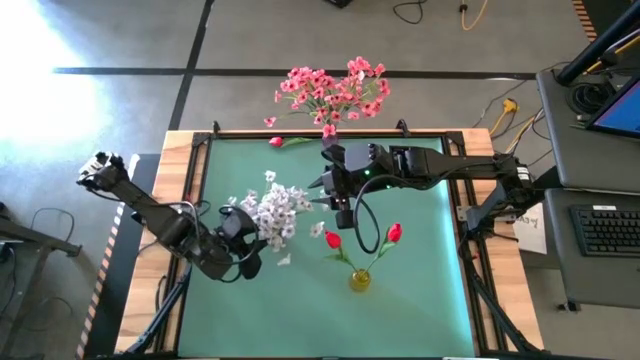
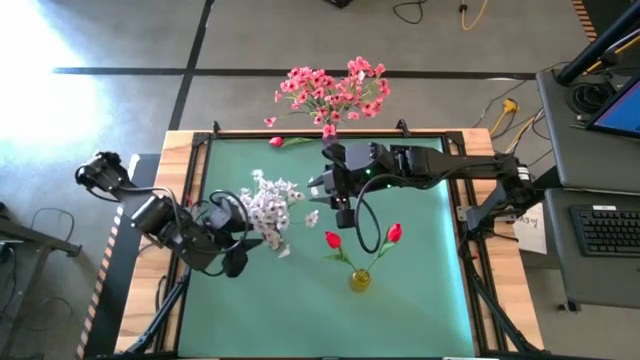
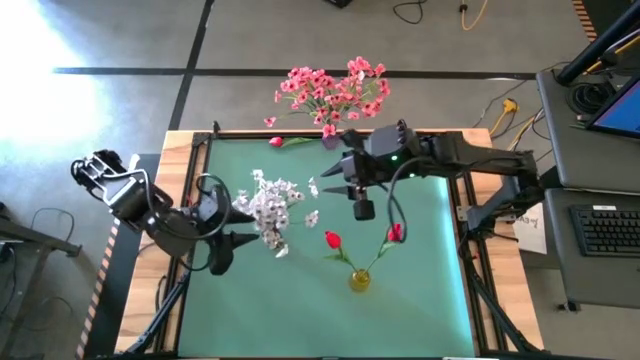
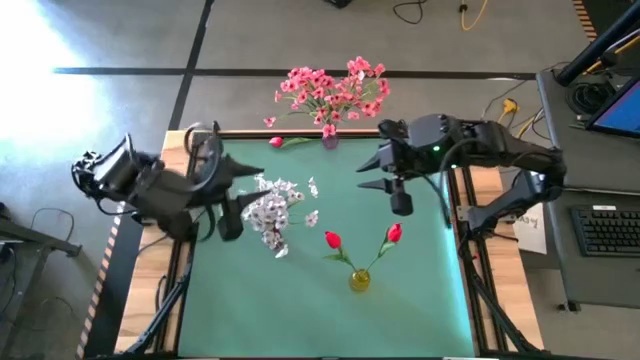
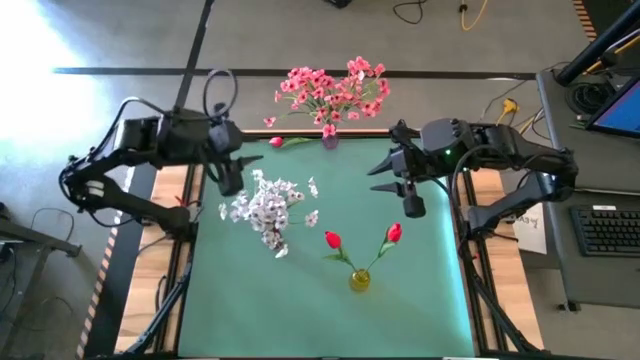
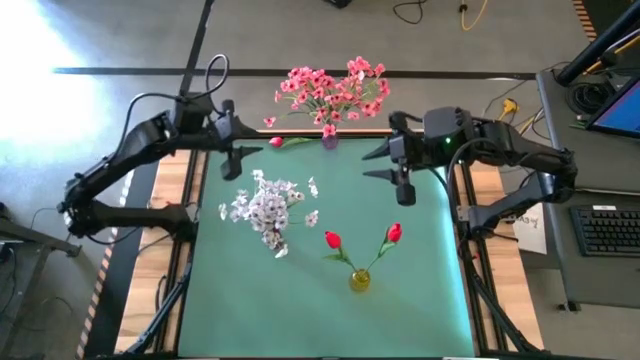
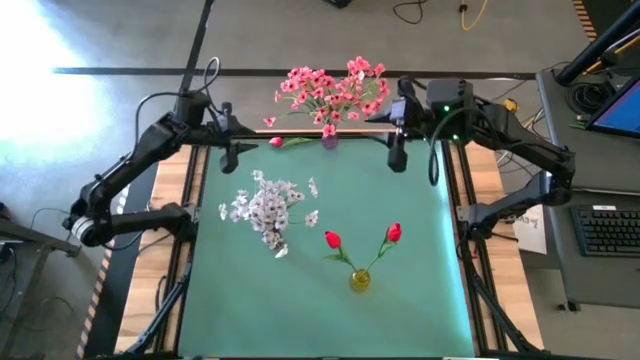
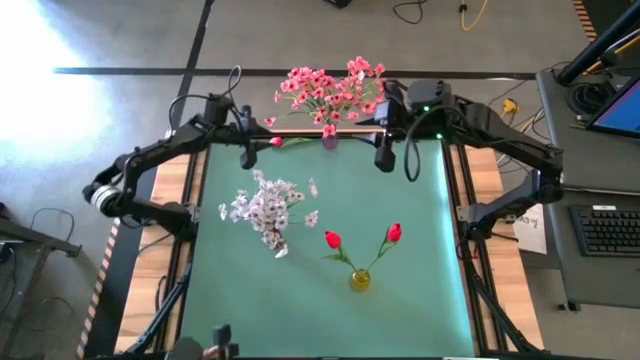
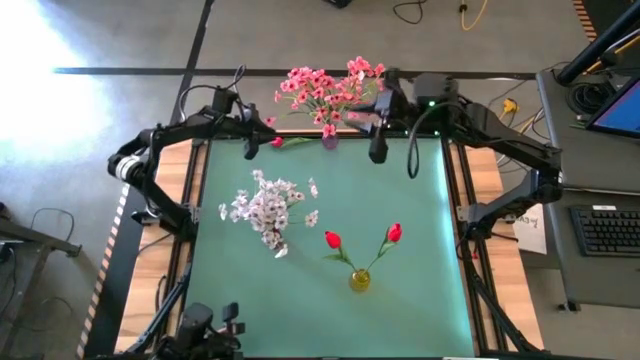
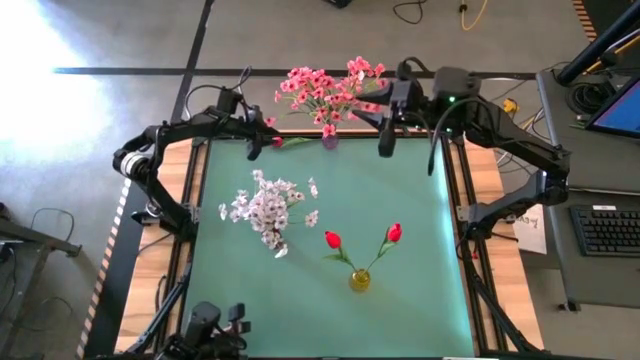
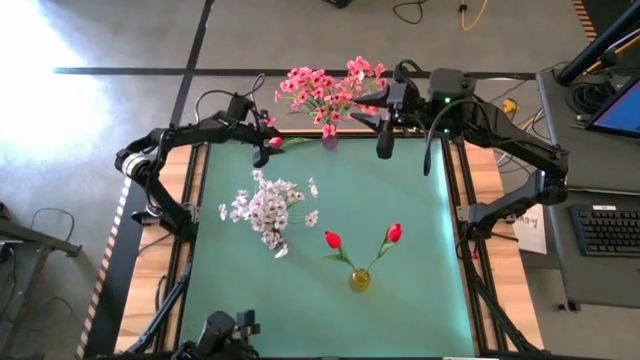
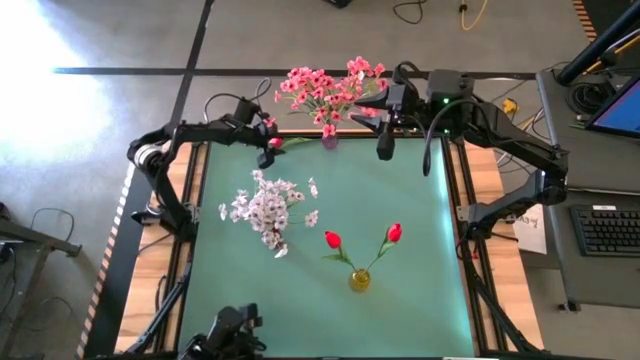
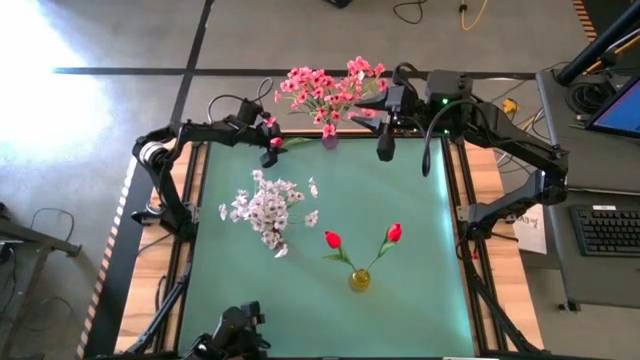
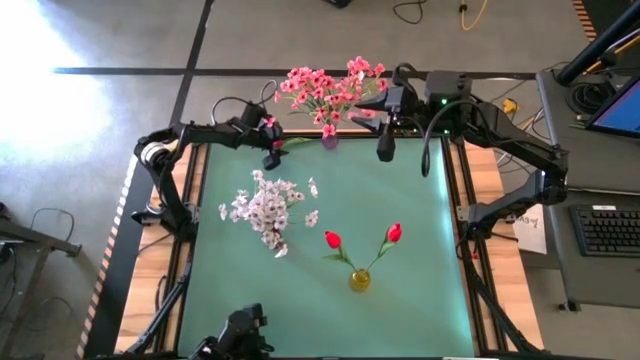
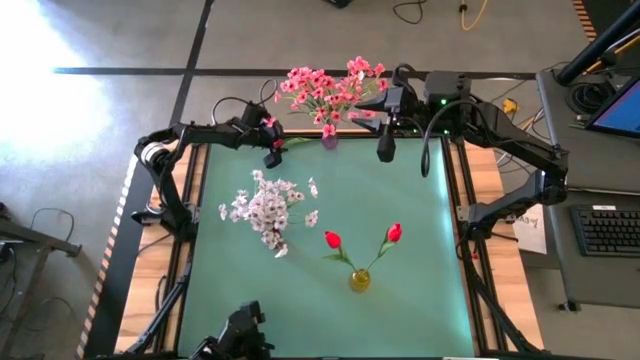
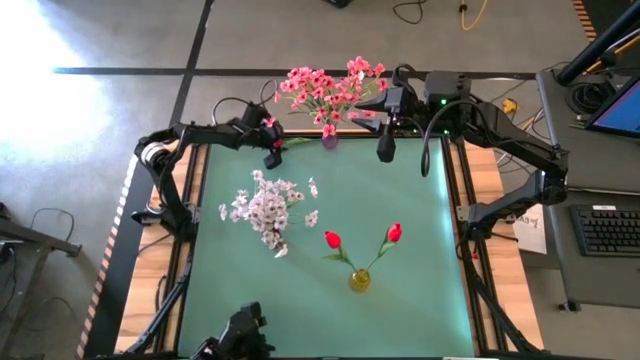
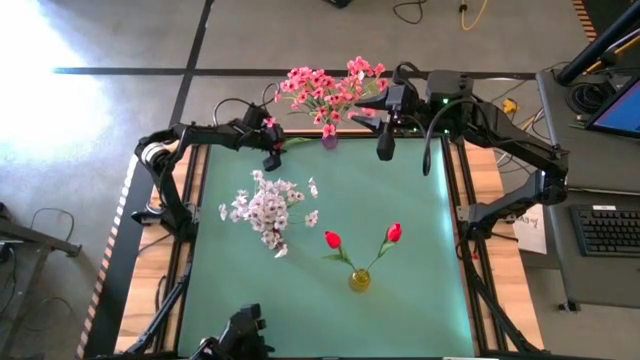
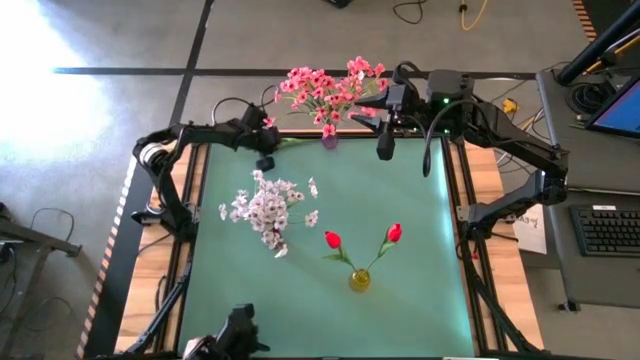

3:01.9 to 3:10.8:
Task: Sort flowers into vase by color
Put the red tulip into the yellow flower vase

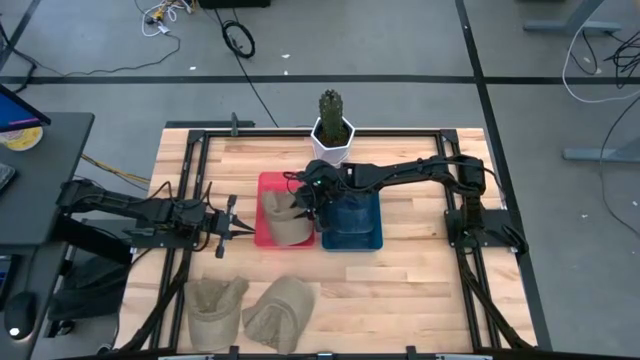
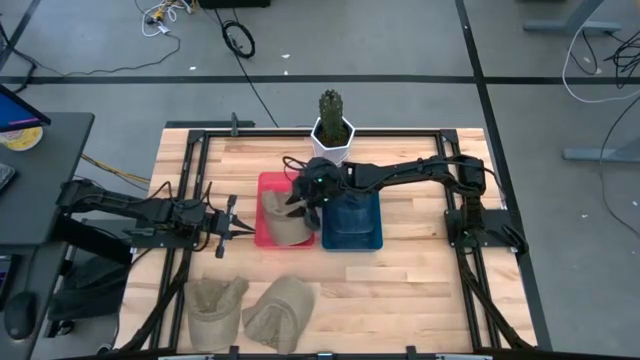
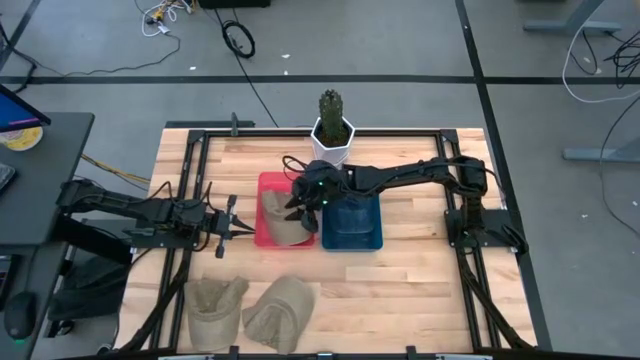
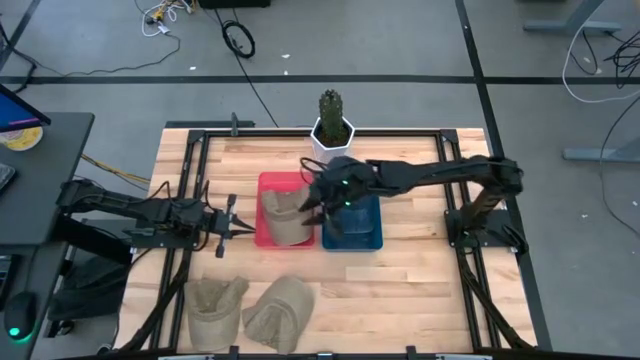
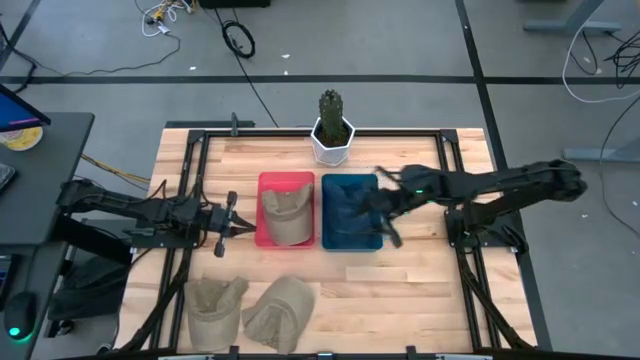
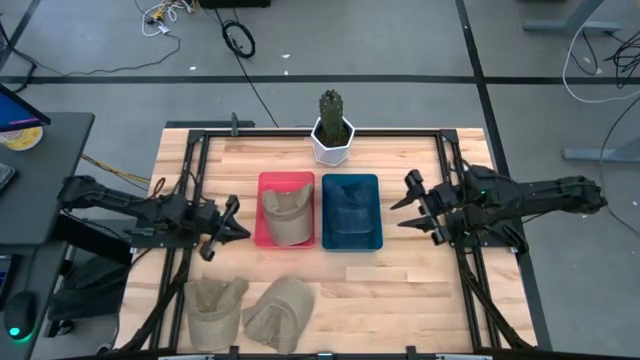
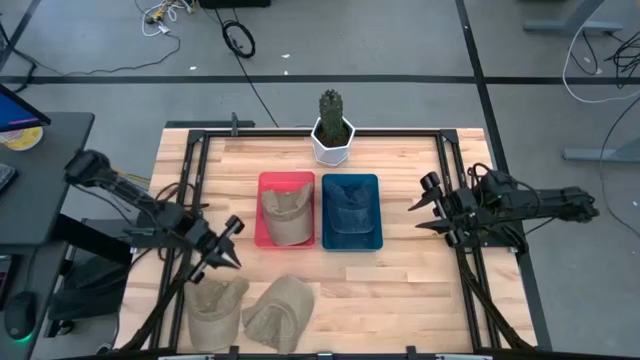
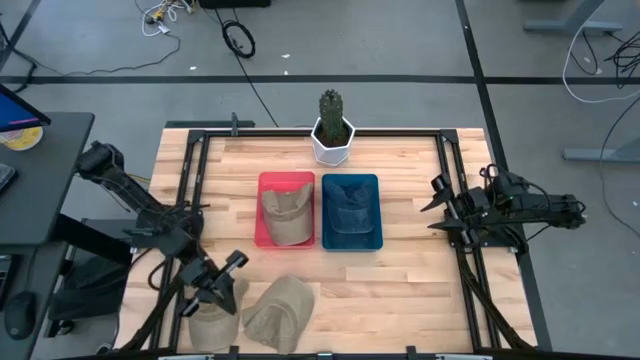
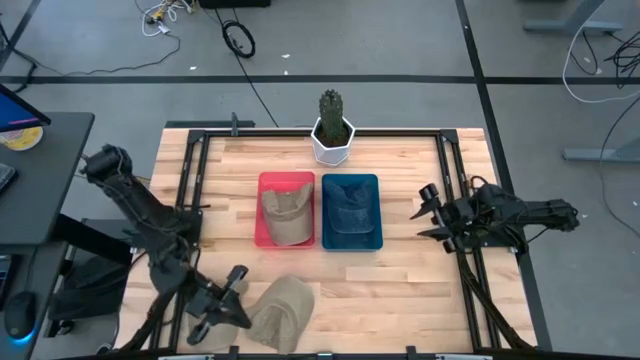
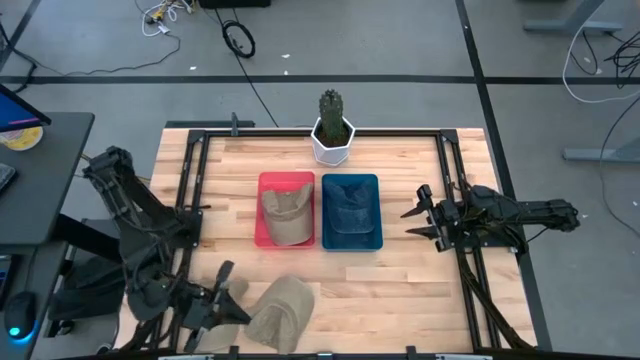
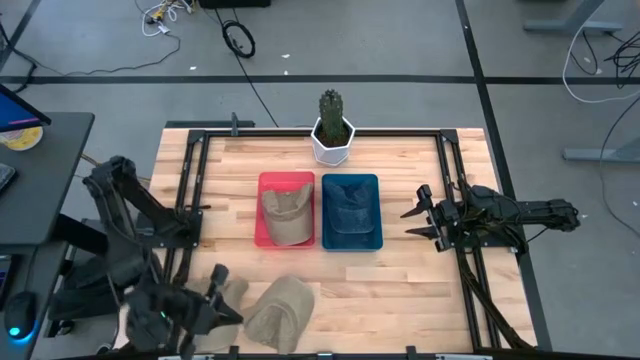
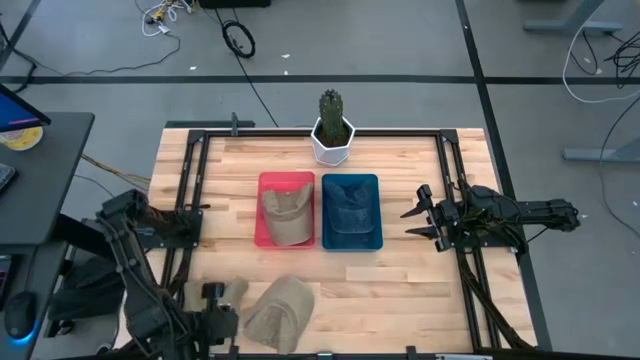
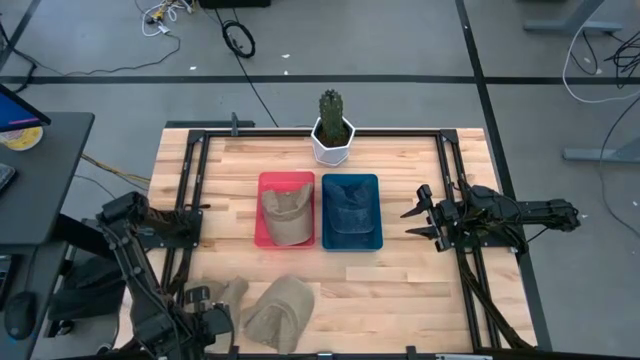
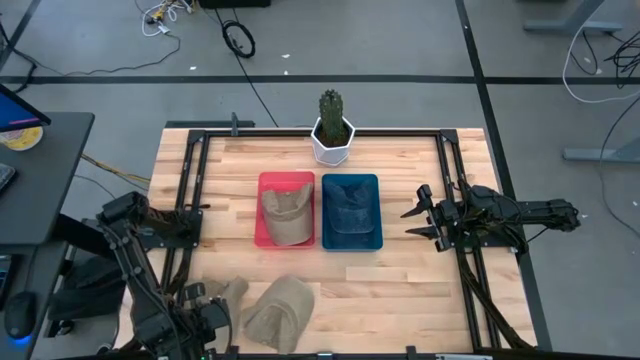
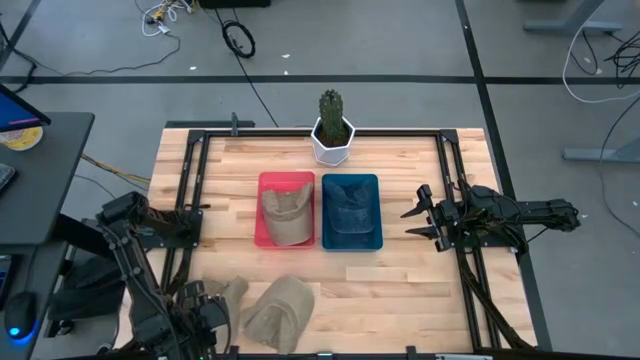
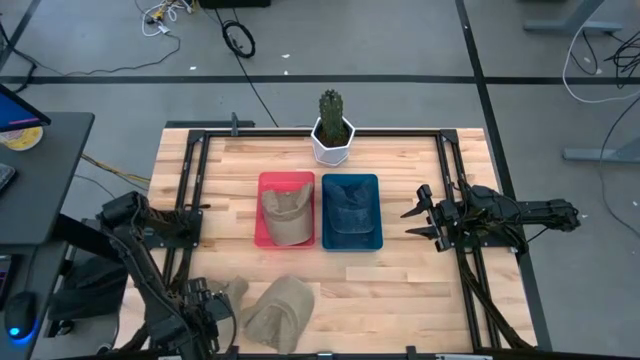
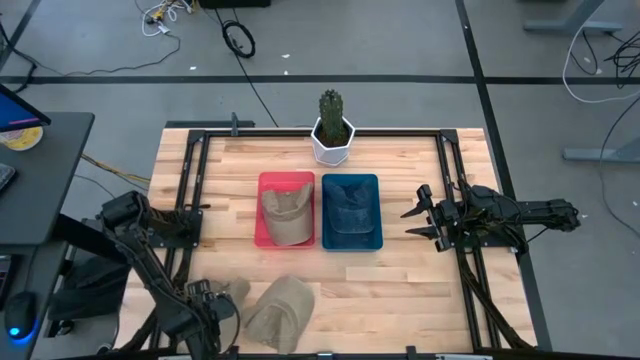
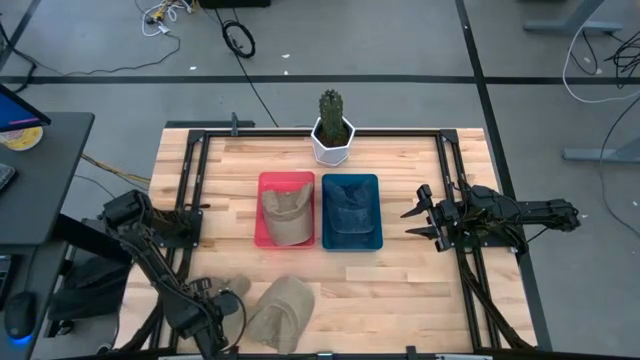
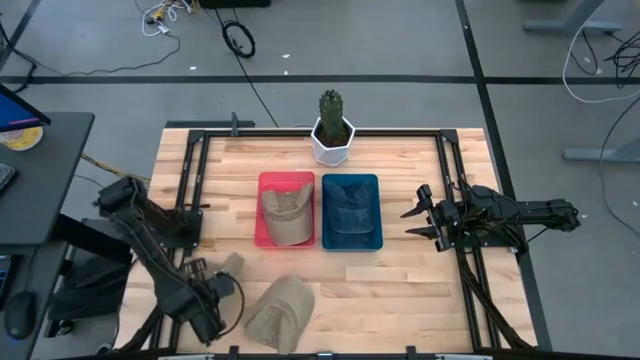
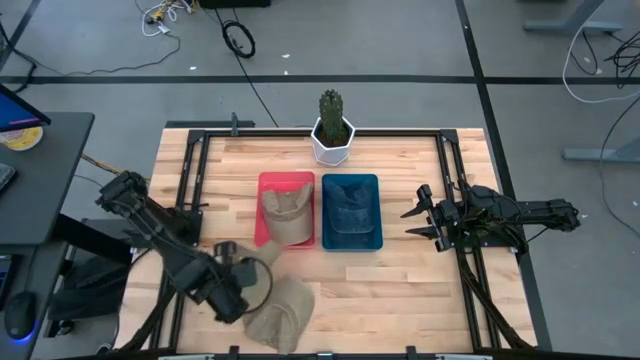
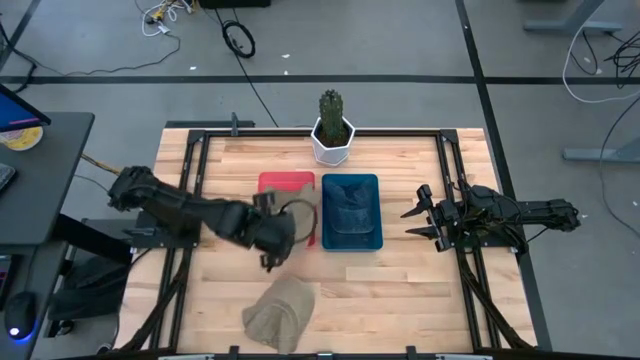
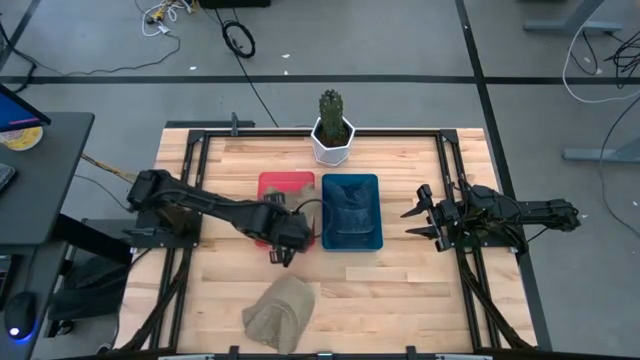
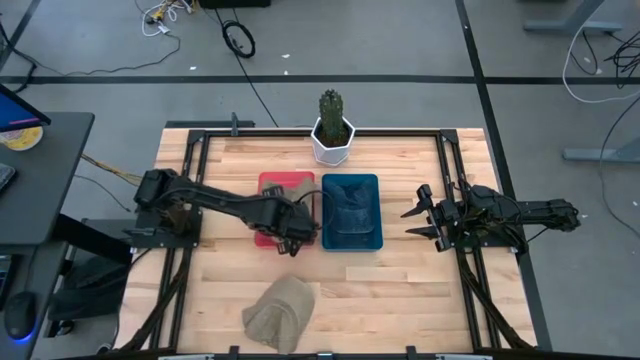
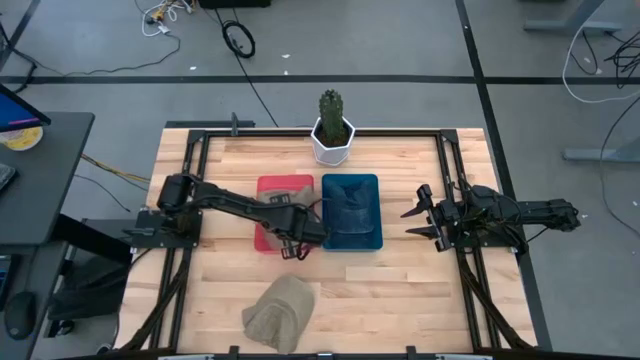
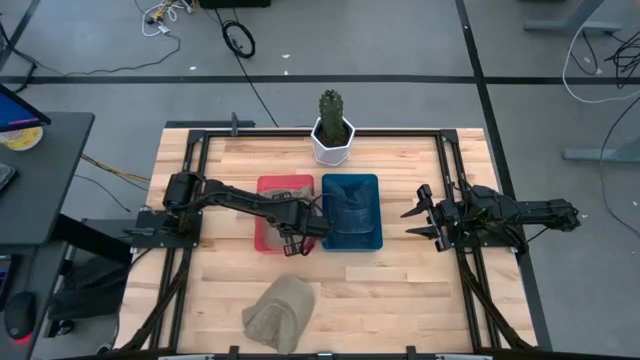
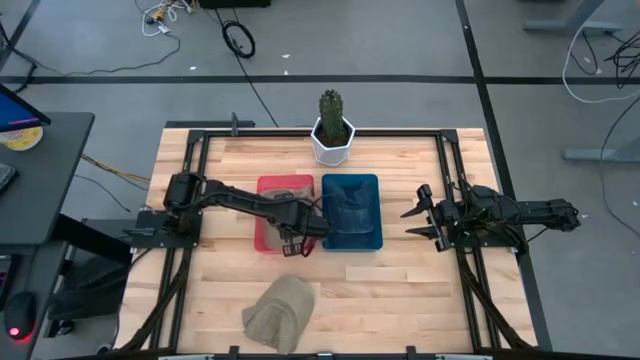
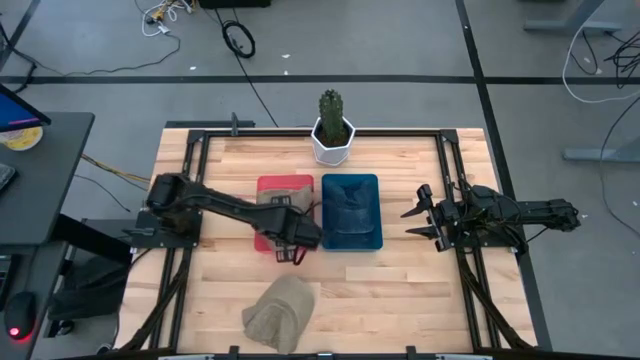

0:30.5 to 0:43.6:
Task: Pick & Place hat
Put the left brown cap into the pink bin
